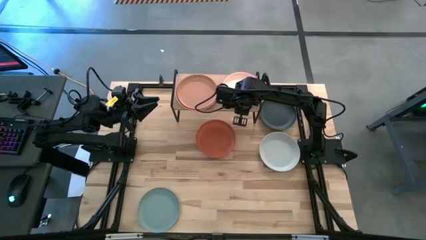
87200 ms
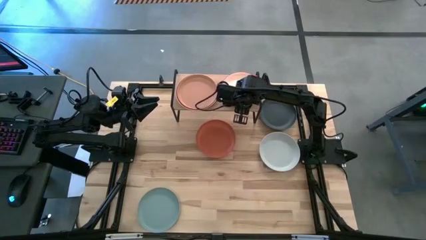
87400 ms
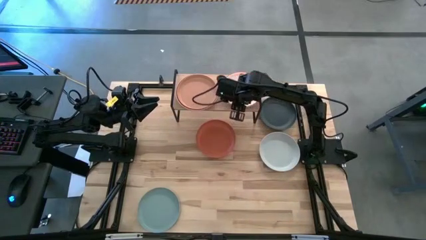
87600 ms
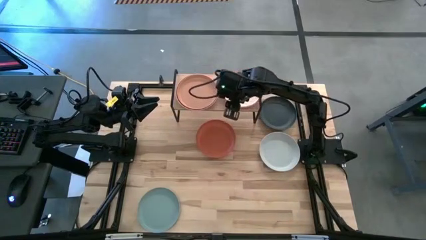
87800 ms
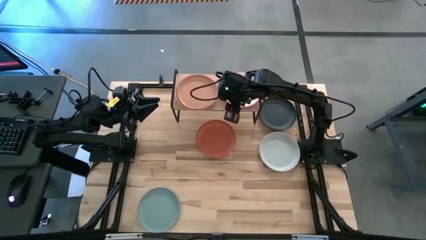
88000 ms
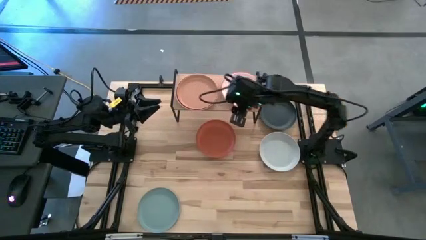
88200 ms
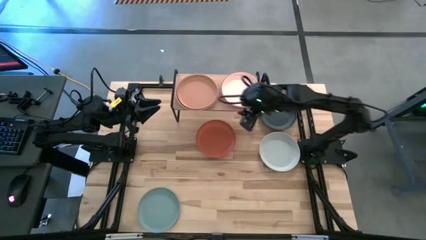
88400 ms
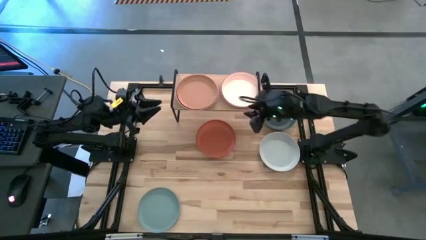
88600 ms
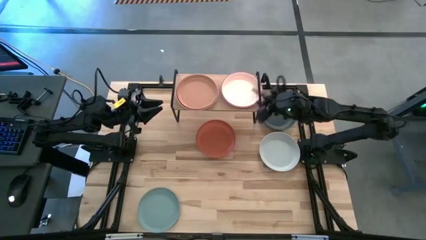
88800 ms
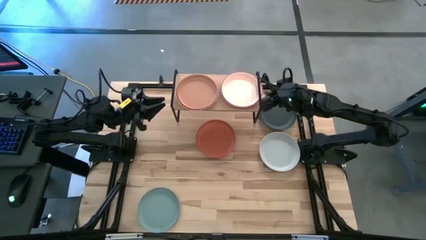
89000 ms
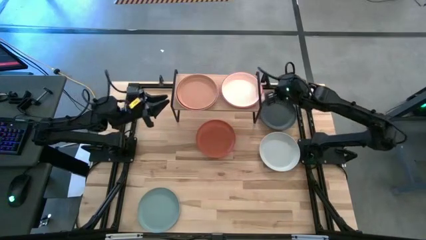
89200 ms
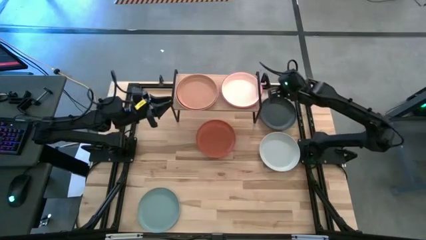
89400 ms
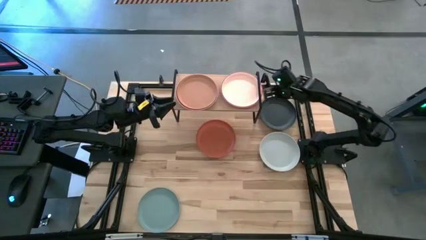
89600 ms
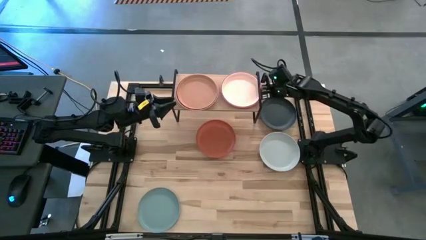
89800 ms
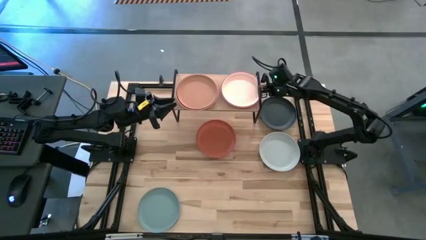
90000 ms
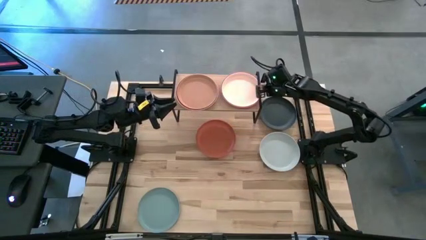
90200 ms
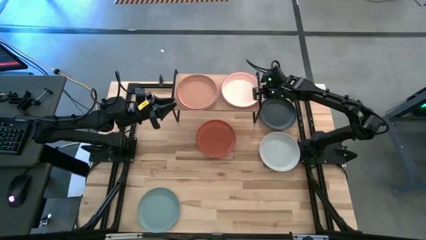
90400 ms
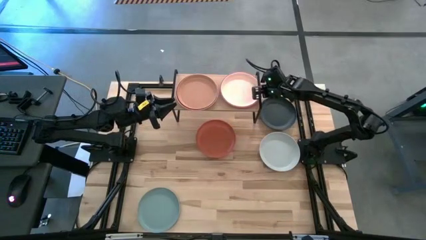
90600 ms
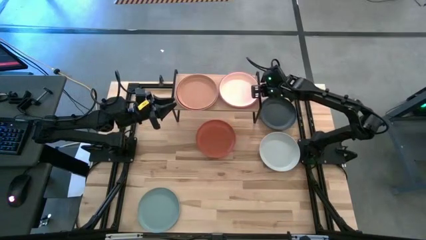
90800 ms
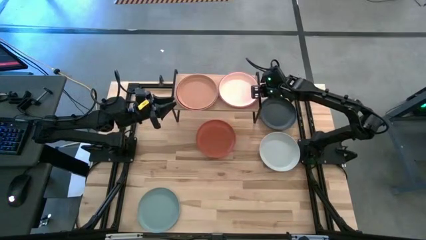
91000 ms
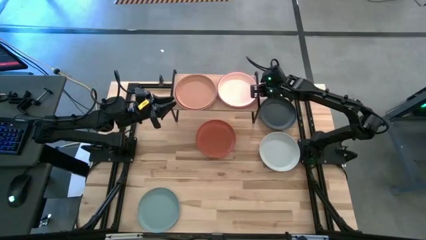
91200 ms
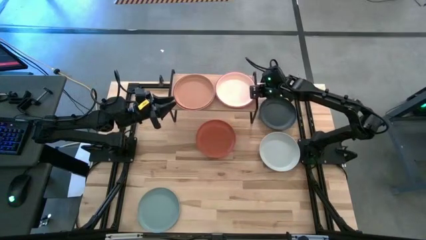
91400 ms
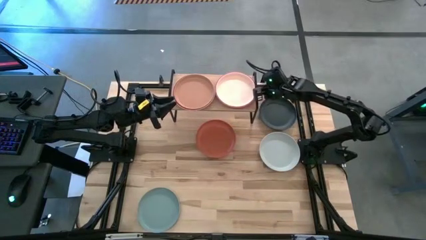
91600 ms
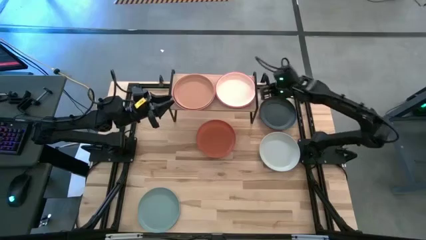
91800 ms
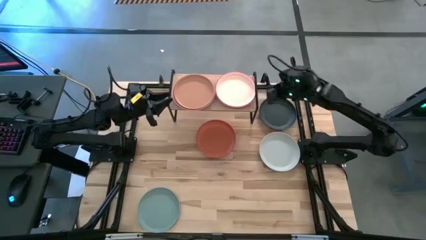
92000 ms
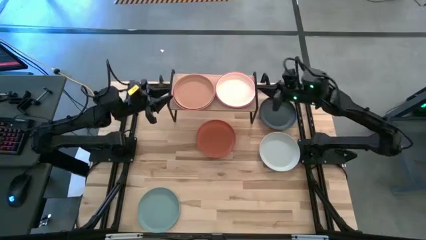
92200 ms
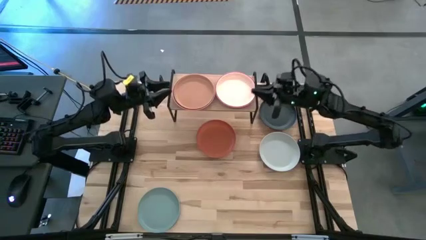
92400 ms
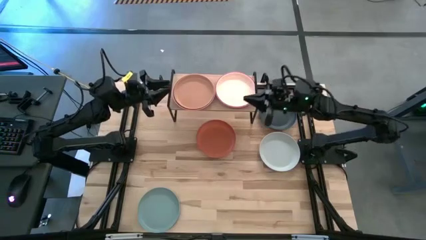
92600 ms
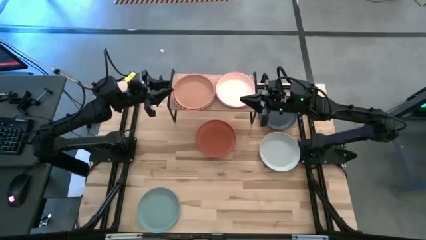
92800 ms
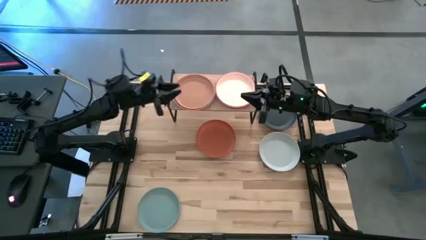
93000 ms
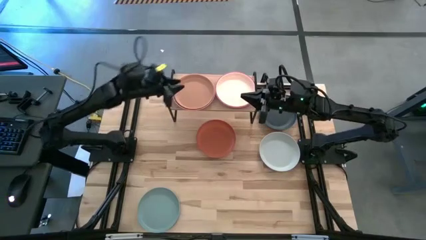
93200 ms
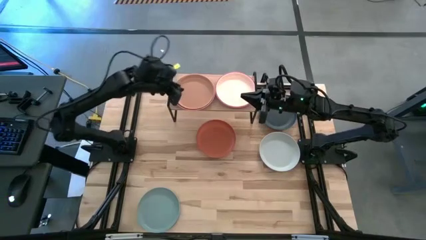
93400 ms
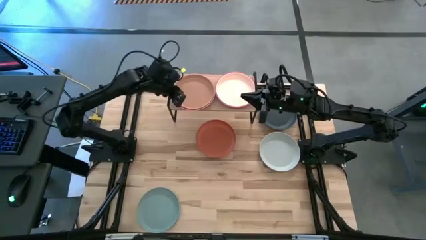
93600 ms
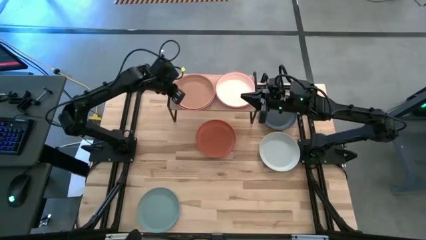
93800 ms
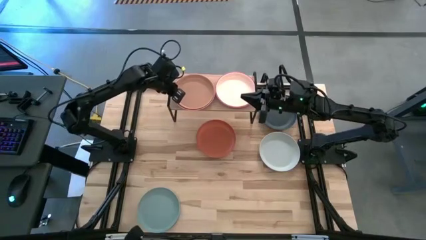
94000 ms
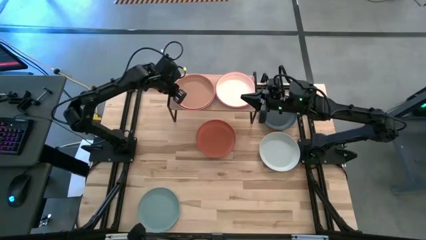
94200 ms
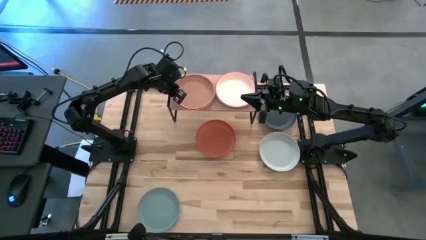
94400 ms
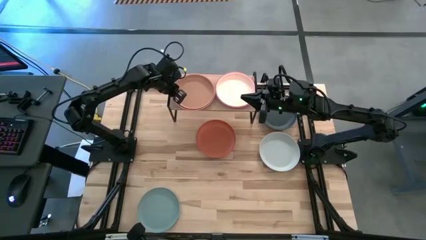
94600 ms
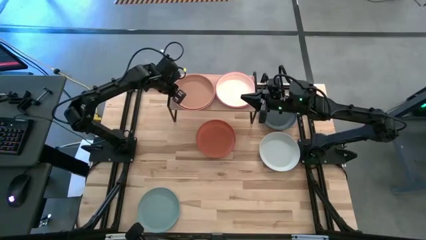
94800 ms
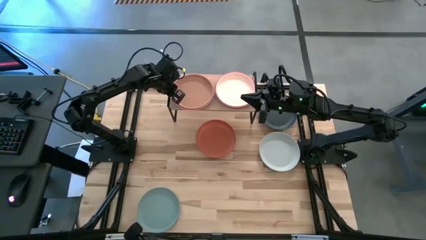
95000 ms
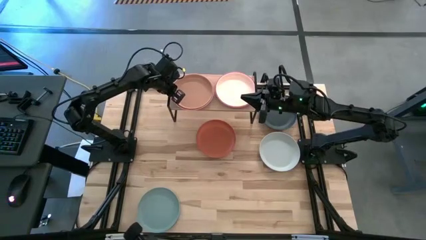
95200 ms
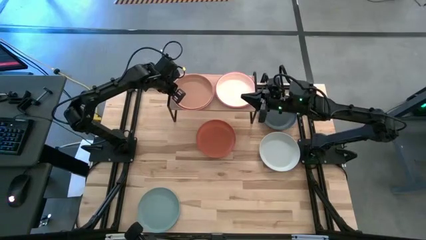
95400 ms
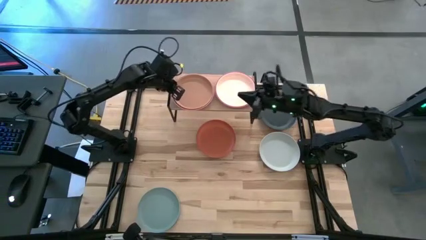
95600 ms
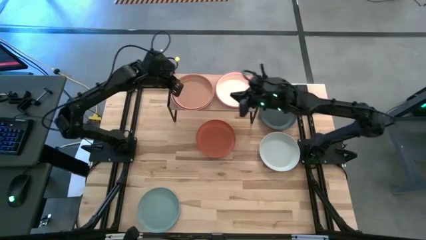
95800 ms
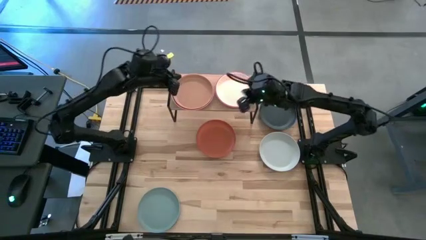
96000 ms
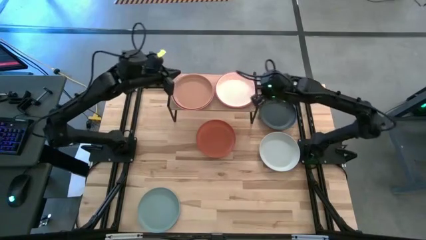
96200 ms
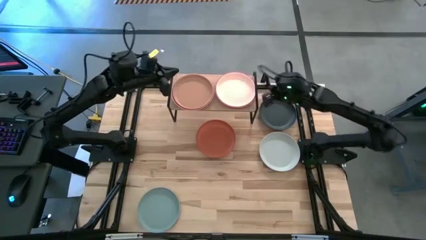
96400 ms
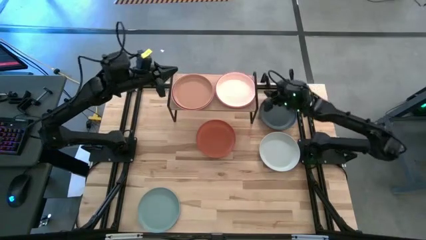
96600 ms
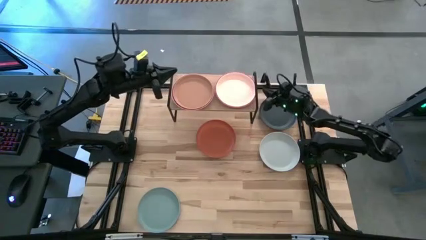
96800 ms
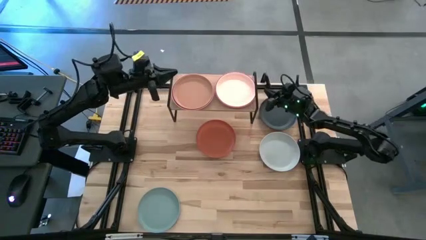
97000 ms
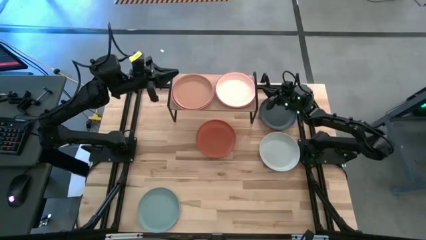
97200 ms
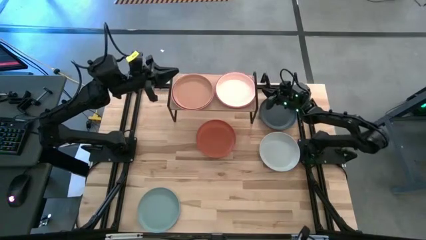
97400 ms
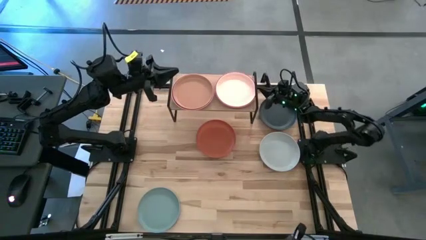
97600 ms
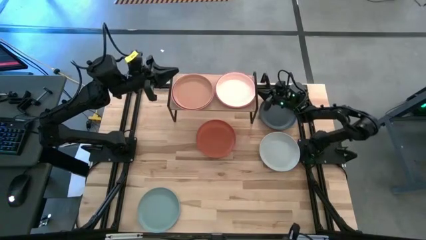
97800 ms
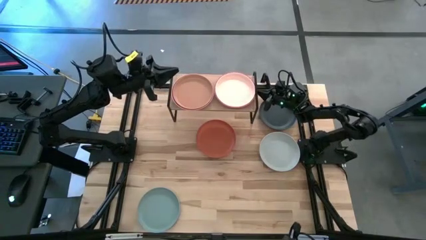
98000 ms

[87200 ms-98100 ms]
Task: Place and stack plates onto a shelf
Adjust the stack plates on the shelf

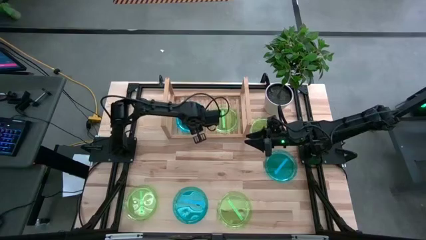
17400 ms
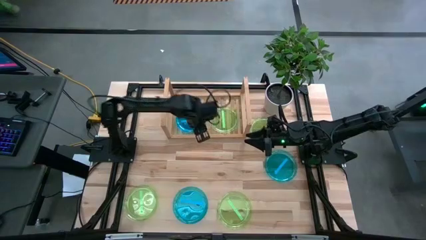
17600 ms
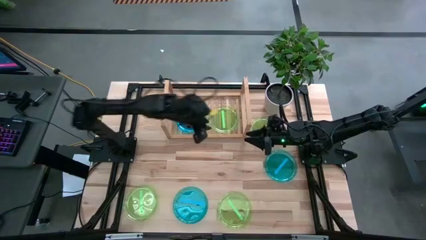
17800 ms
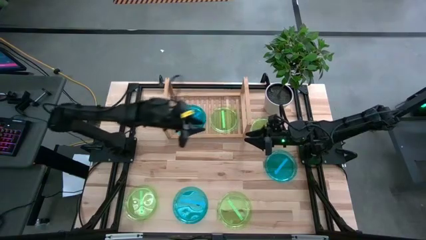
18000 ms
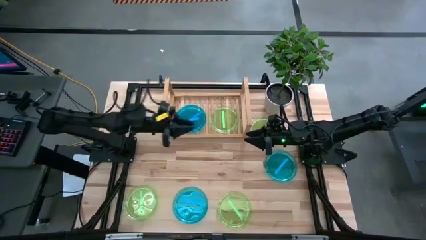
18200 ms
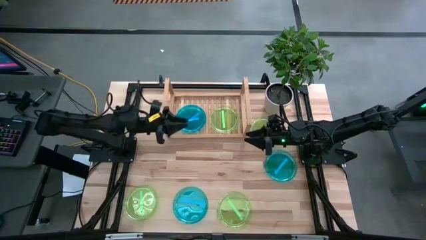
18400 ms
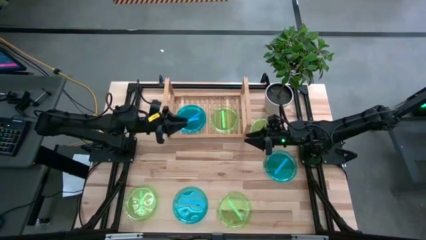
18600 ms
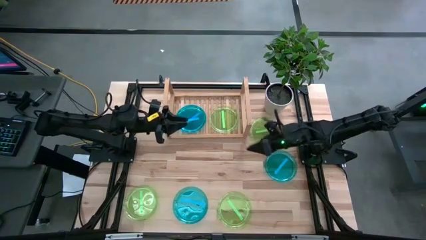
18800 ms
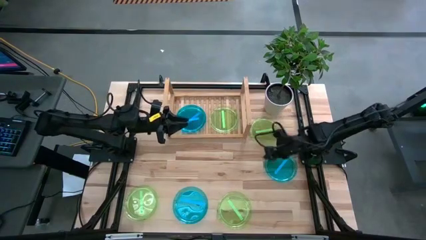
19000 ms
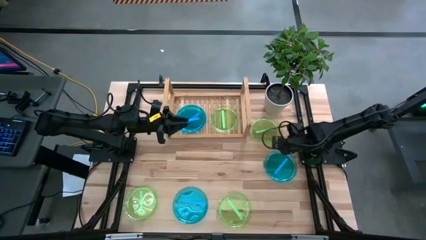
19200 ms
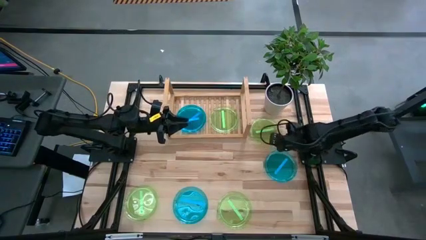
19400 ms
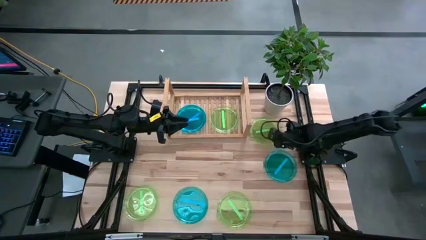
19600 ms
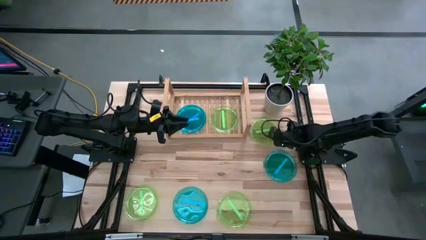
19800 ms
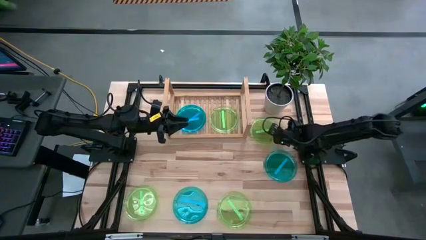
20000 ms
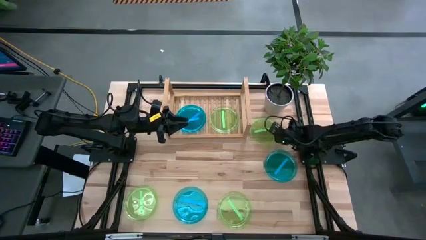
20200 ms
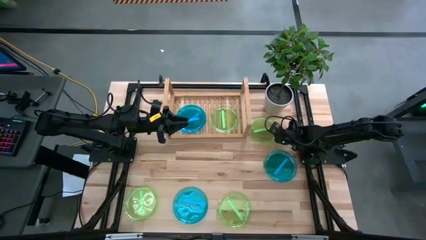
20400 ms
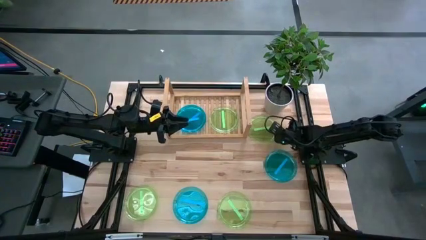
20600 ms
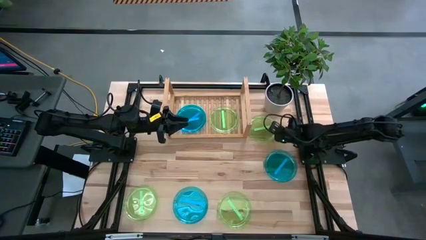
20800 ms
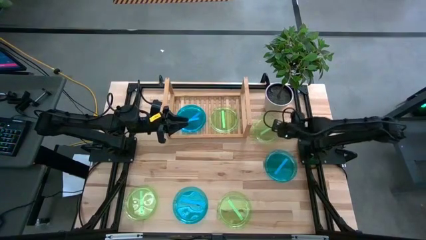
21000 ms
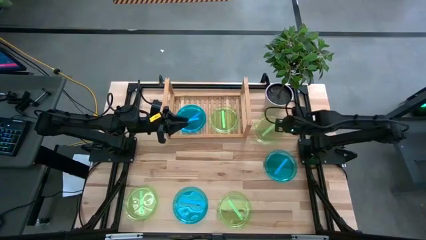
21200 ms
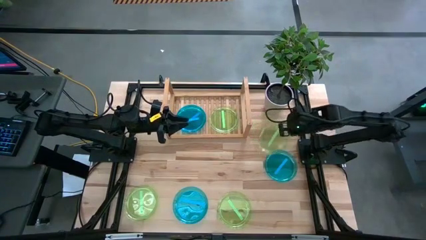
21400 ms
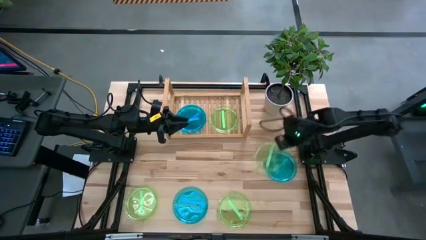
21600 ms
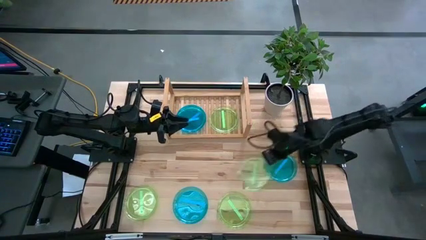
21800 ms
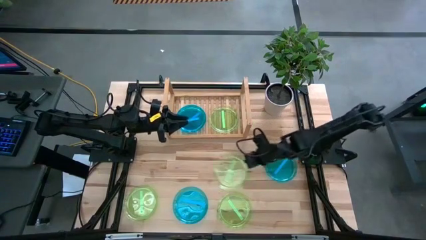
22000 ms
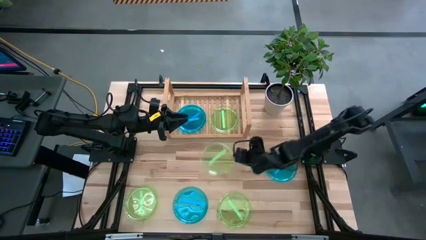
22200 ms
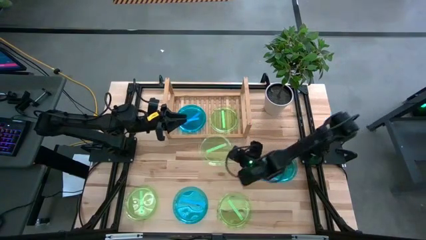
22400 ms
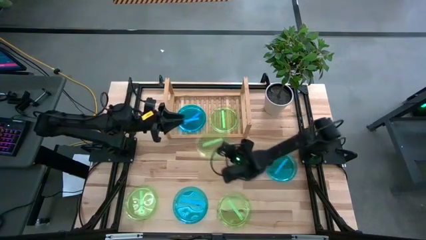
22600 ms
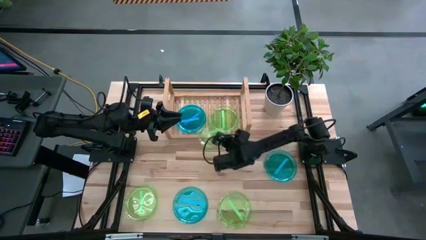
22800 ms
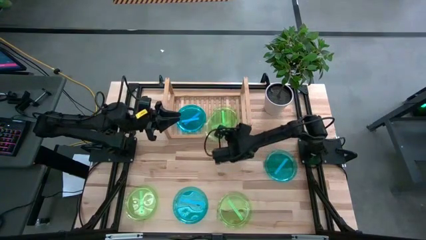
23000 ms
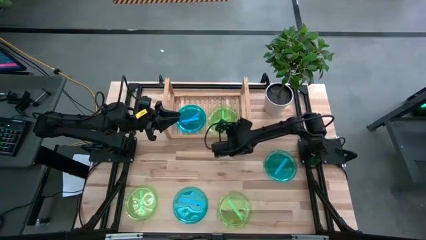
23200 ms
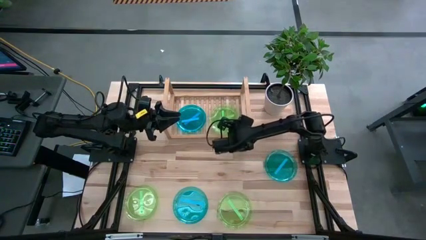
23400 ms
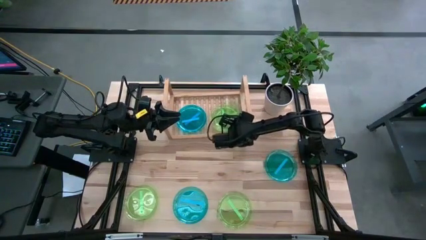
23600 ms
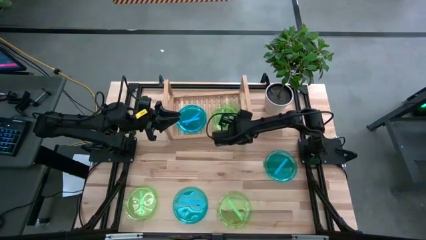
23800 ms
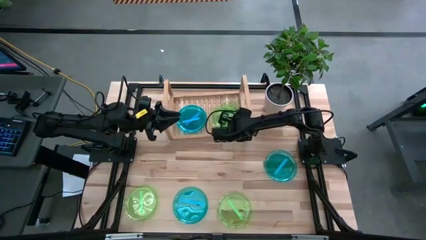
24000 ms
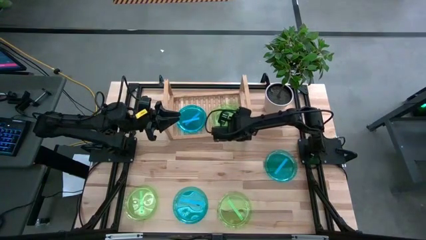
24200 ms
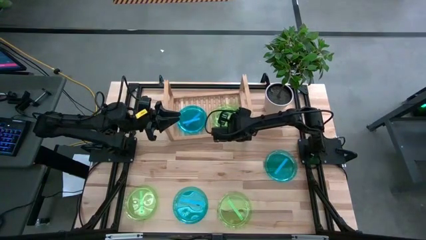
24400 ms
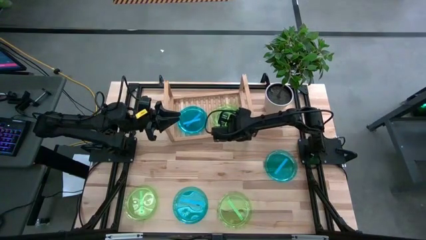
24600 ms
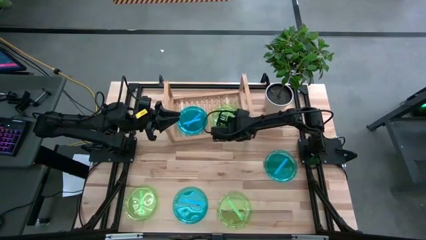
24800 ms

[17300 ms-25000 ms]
Task: Place and stack plates onto a shelf
Stack the top transparent green plate on top of the transparent green plate on the shelf
